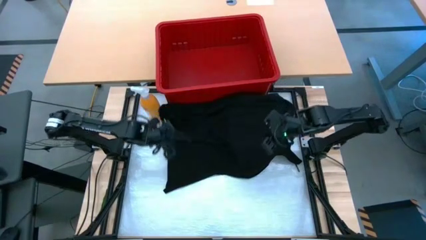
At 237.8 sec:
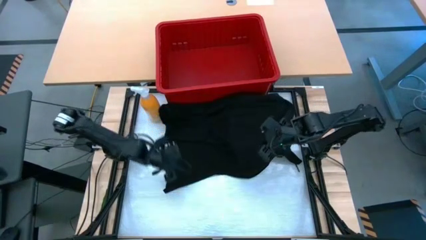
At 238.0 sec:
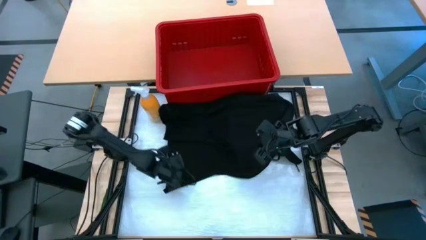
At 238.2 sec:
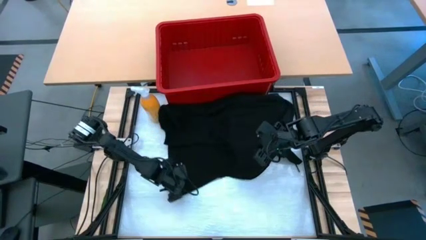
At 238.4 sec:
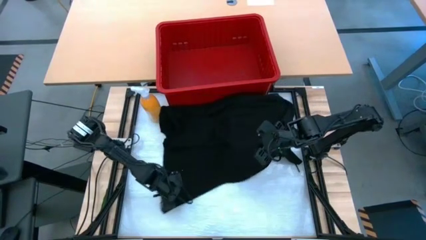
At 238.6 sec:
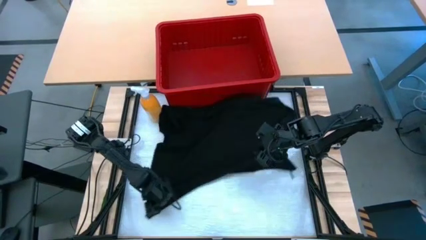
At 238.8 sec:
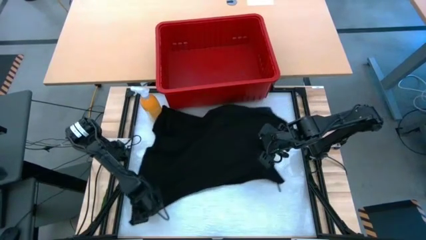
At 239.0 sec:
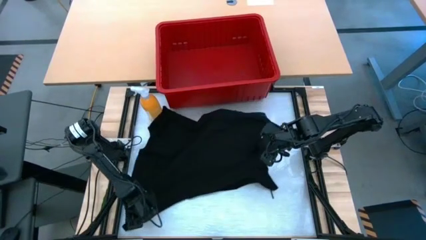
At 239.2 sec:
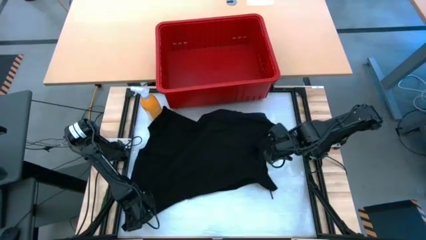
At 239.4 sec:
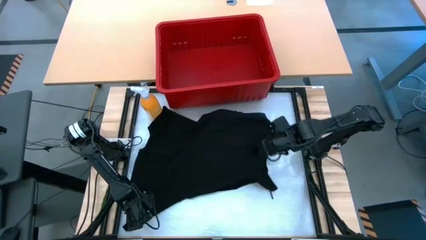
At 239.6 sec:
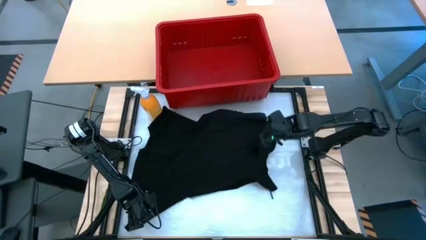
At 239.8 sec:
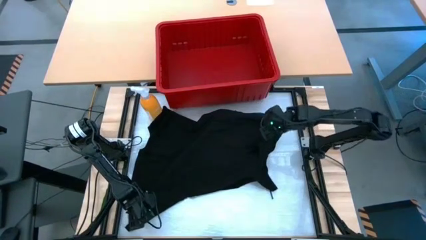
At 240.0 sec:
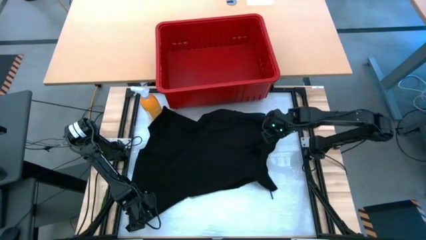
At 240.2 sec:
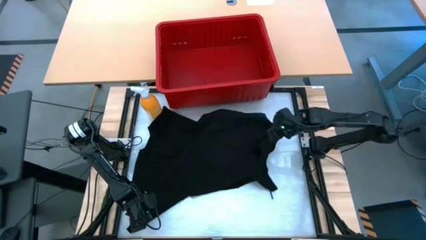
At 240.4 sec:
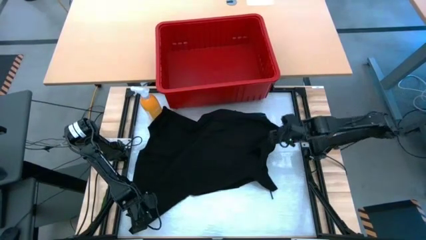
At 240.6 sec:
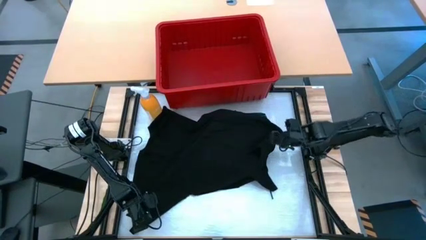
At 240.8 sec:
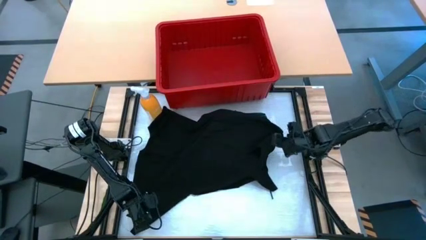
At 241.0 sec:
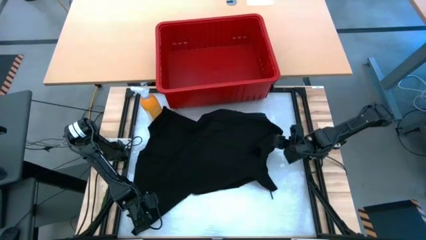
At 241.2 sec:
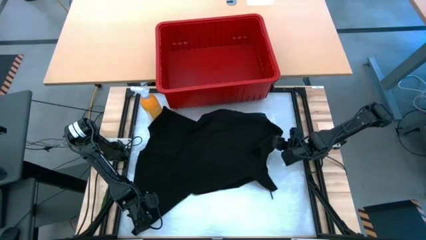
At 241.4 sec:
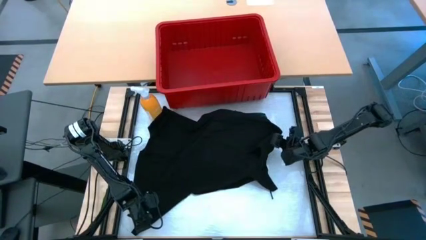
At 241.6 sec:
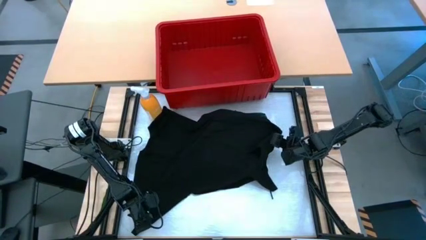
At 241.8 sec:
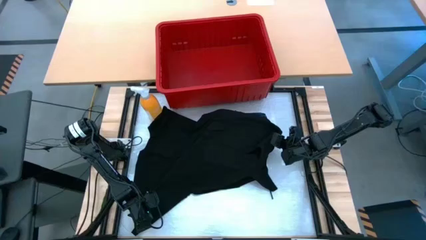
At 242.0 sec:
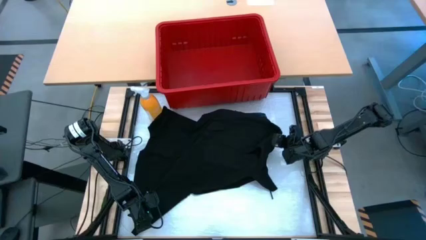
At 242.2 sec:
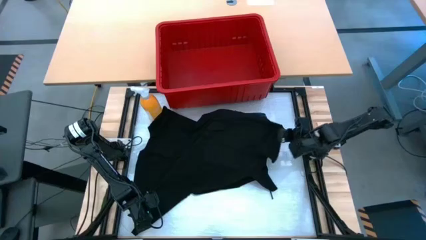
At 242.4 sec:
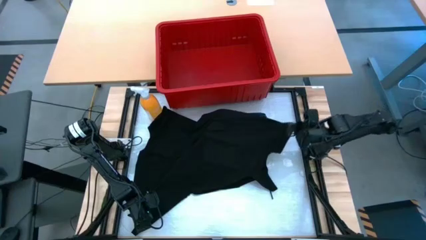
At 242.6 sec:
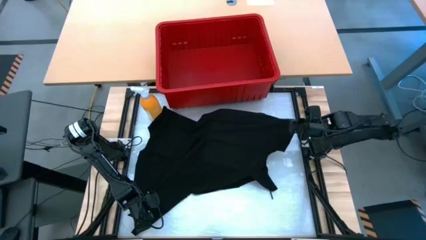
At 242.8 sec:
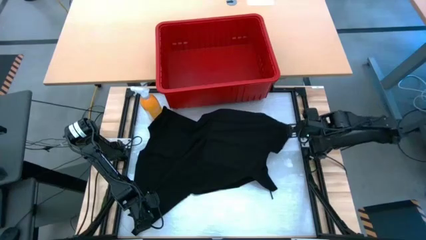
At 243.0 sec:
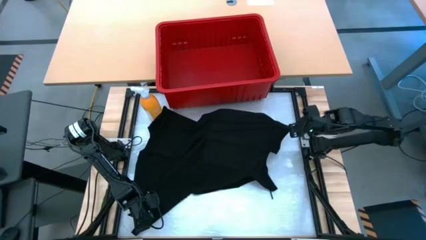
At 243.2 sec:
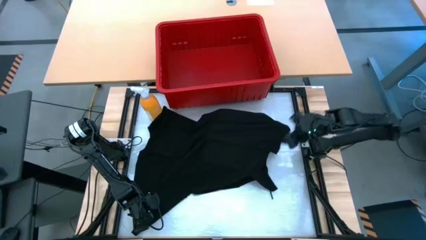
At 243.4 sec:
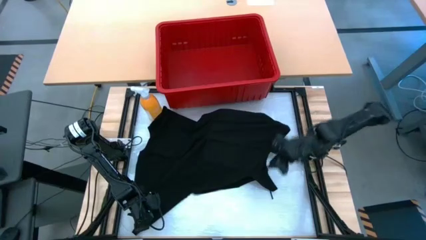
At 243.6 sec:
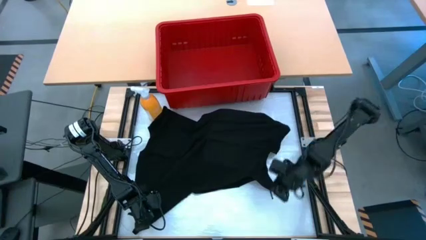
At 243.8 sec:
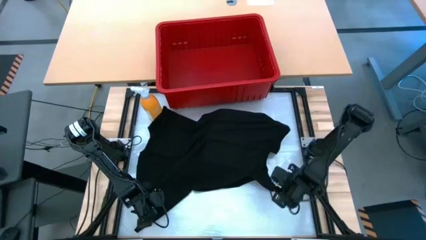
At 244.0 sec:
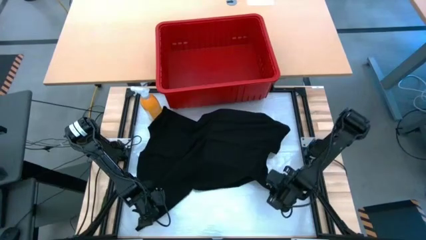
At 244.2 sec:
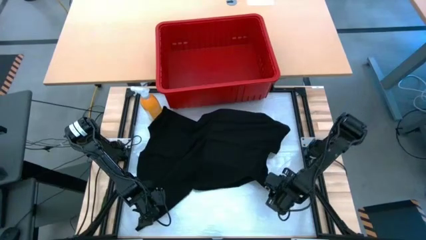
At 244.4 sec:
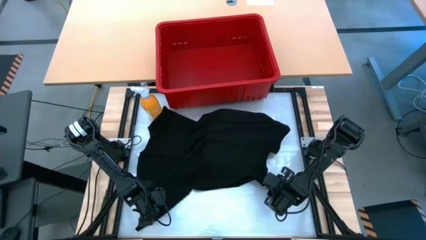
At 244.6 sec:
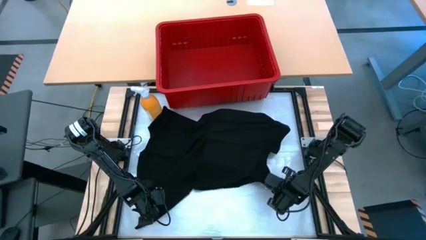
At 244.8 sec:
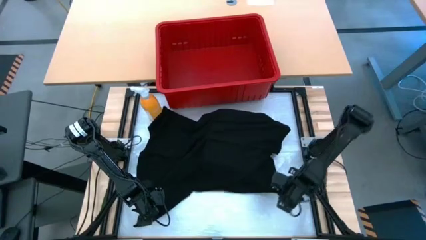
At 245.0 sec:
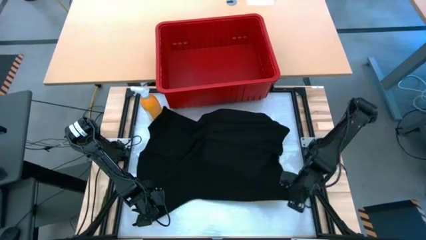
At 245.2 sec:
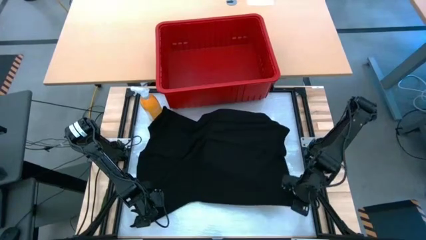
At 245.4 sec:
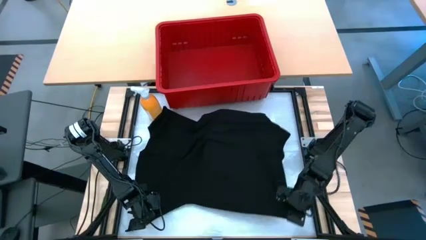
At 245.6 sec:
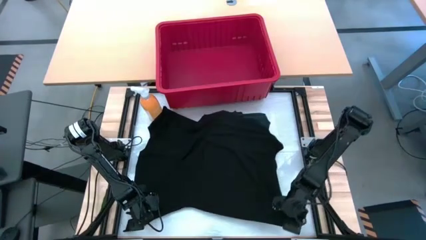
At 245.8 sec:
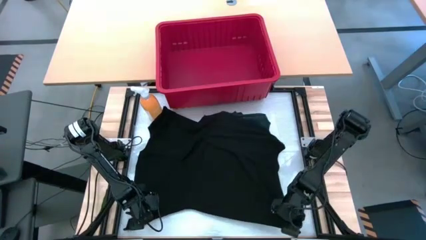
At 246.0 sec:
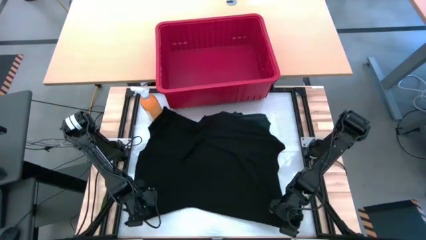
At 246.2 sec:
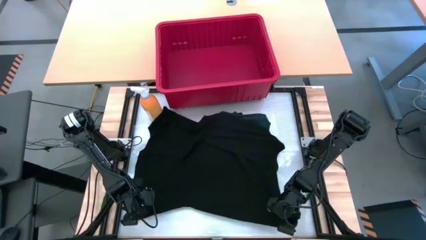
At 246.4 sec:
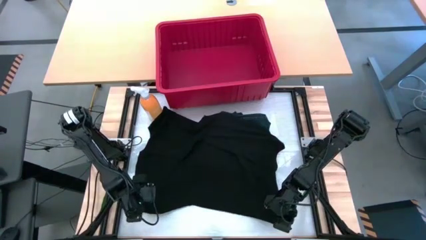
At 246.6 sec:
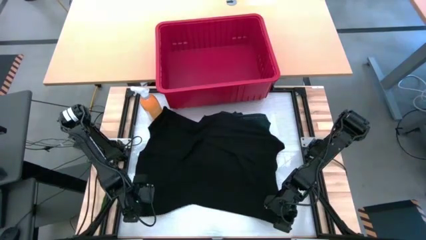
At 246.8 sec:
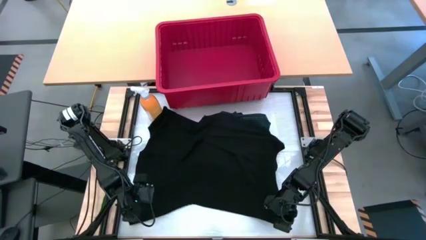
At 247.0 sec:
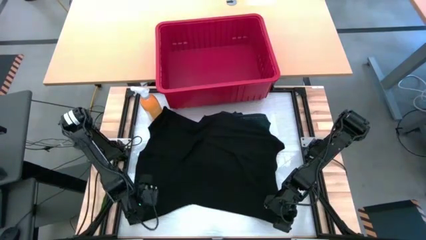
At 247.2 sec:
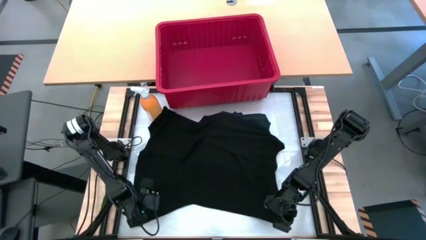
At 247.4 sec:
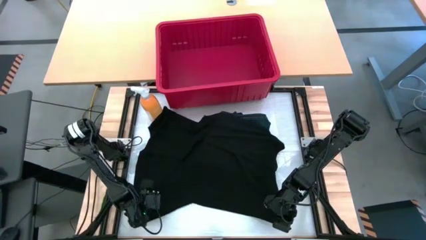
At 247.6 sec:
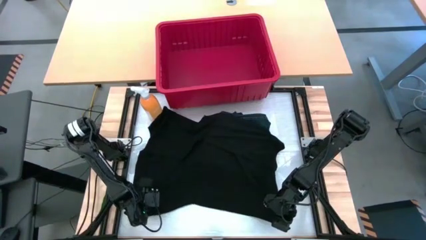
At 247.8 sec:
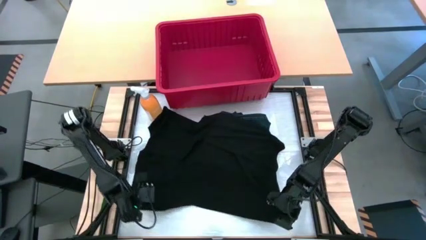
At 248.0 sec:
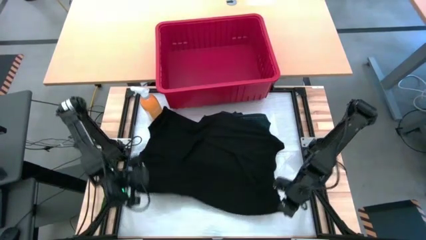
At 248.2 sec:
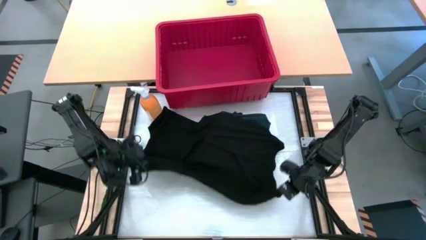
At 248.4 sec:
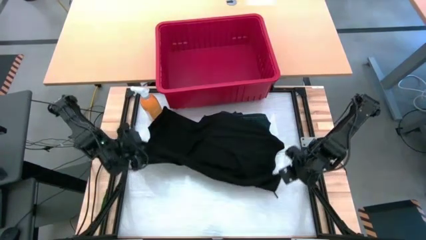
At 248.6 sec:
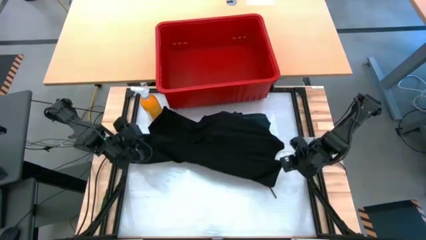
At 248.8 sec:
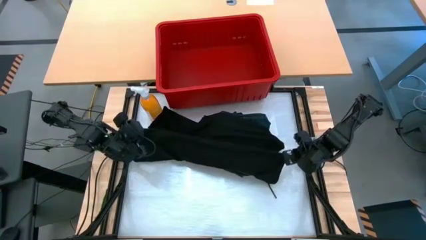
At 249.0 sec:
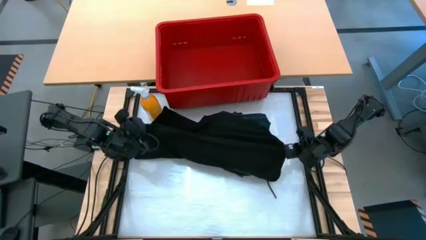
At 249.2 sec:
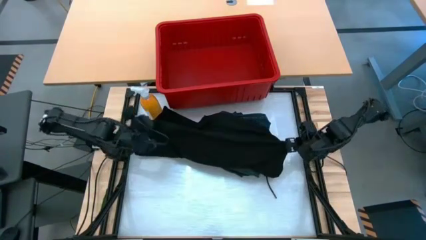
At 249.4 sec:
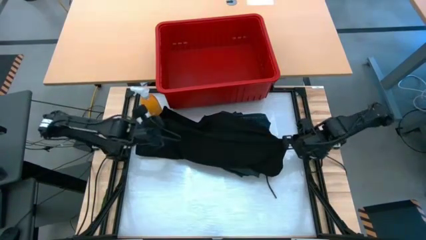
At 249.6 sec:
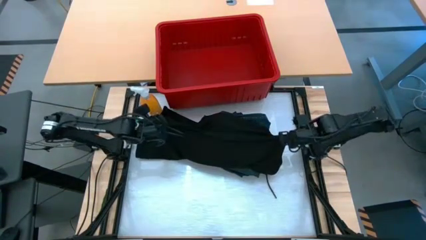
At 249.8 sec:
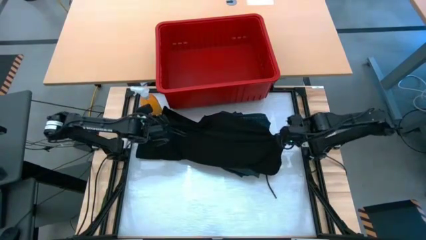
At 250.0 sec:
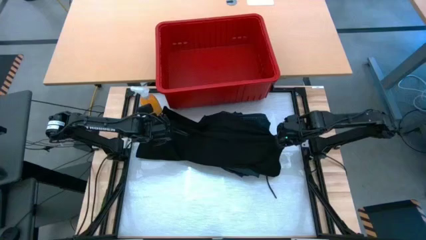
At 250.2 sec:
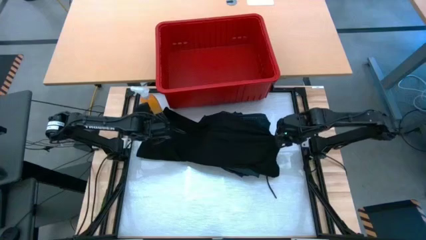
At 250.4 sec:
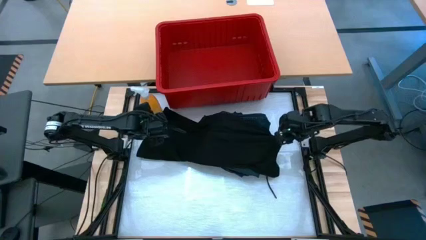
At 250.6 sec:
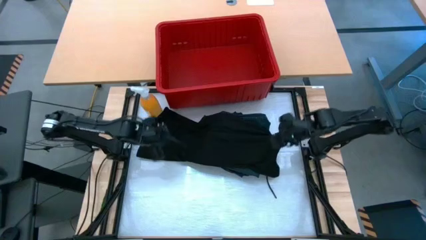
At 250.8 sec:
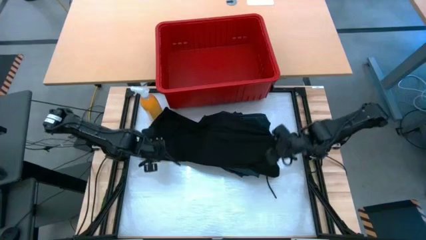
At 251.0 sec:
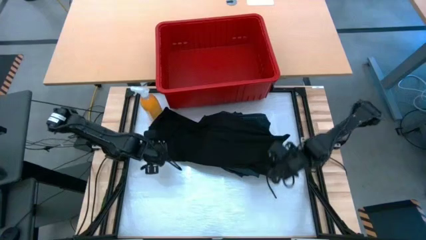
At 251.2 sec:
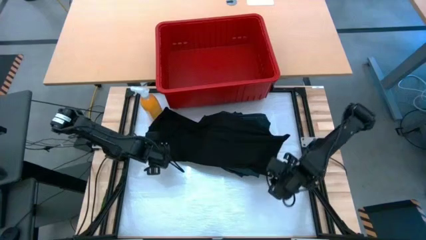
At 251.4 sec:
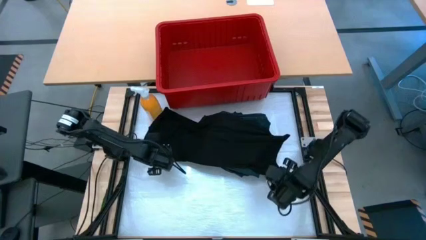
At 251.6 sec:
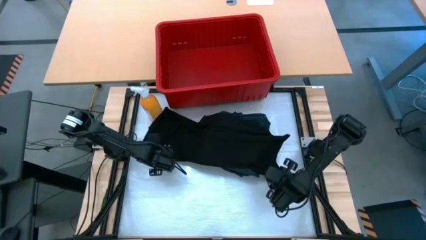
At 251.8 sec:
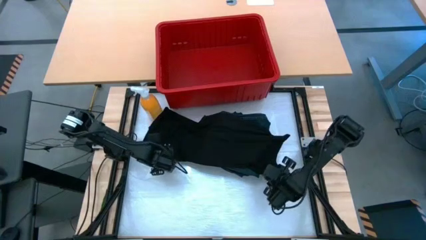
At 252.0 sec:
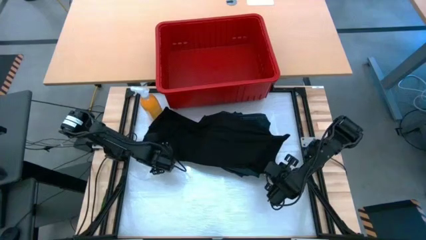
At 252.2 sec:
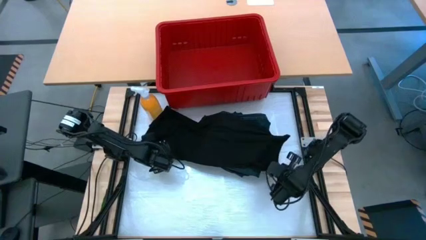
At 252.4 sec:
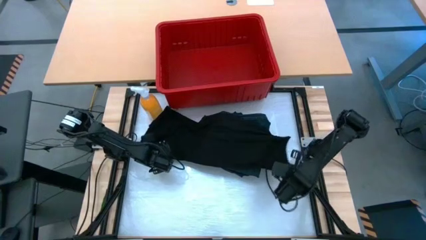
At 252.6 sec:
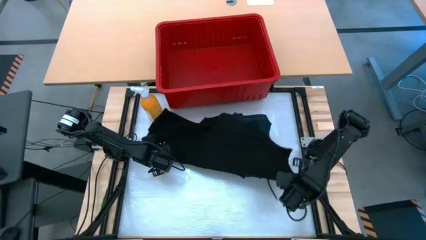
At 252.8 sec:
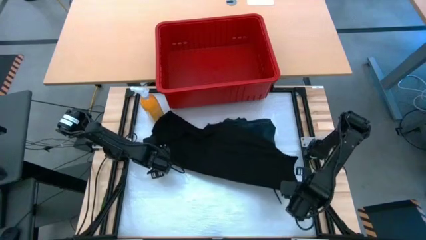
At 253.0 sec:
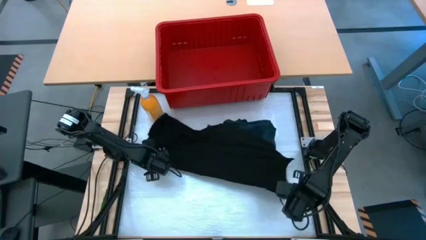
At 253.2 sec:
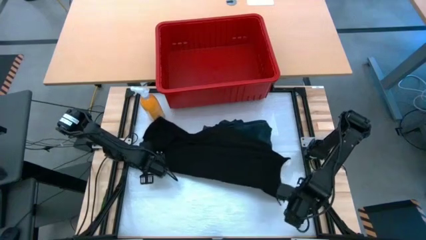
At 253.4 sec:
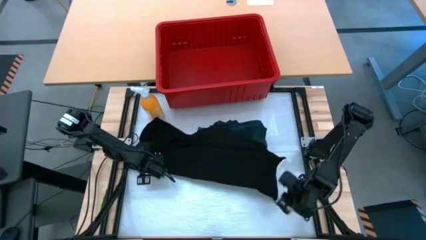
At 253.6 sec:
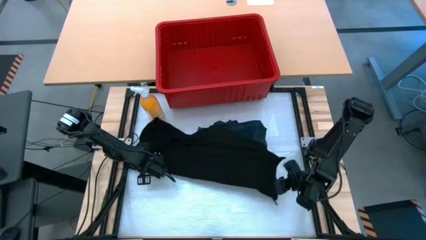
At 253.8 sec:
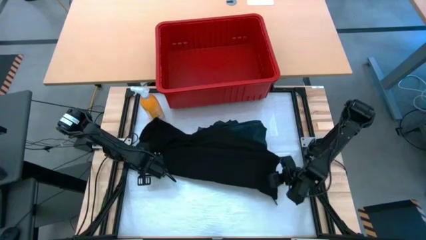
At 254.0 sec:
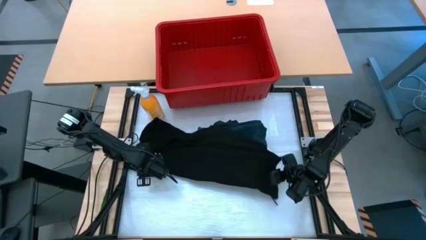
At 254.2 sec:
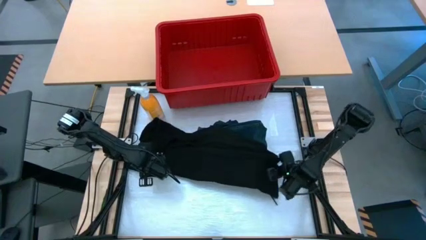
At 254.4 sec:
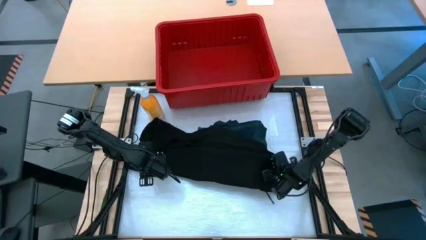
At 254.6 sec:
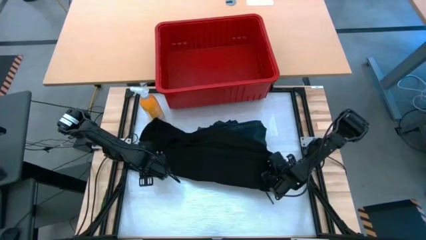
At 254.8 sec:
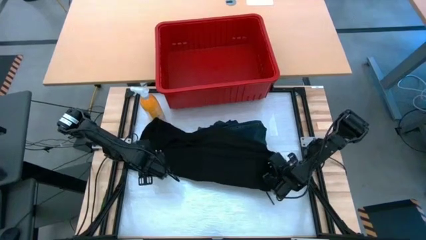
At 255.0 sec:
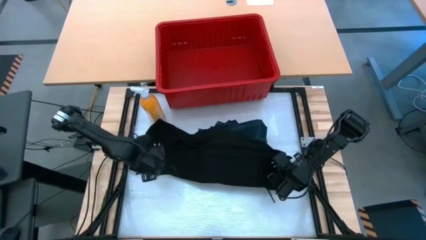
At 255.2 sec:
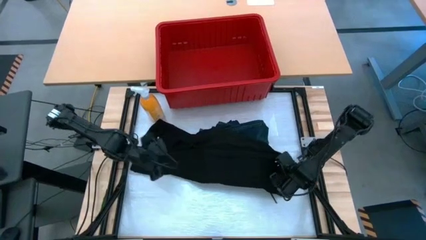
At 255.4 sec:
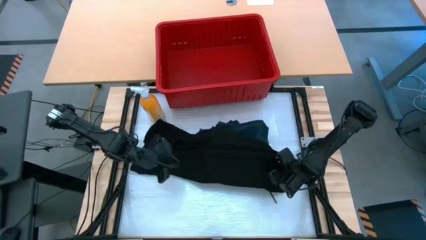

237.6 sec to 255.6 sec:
Task: Fold Laundry from Bin
Fold the black shirt from the red laundry bin
